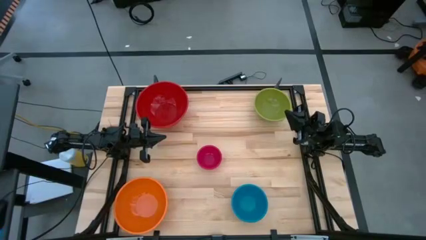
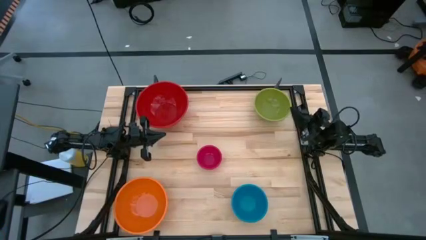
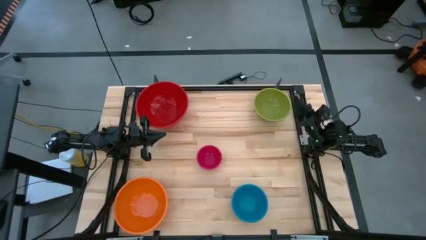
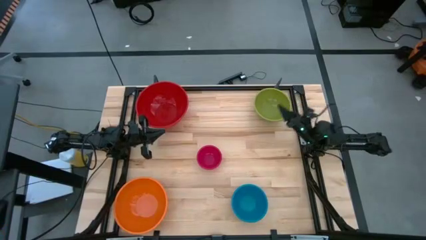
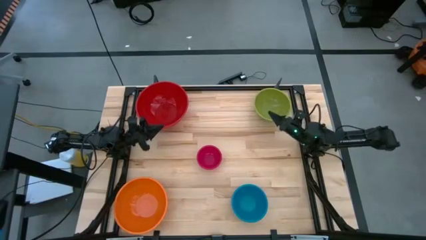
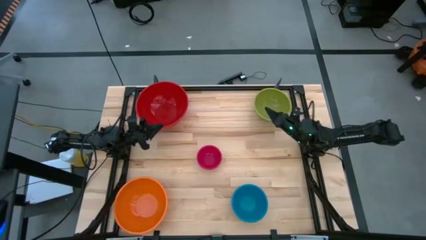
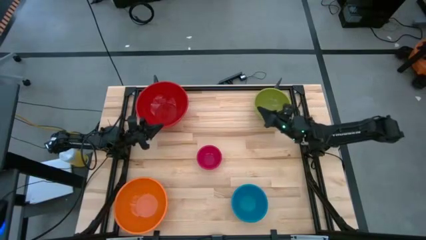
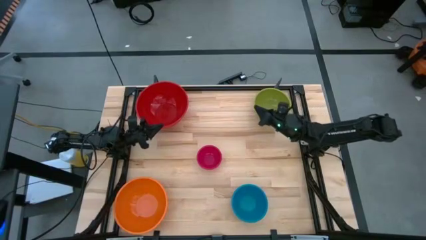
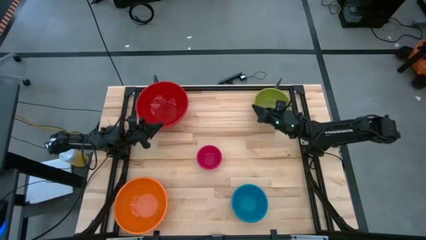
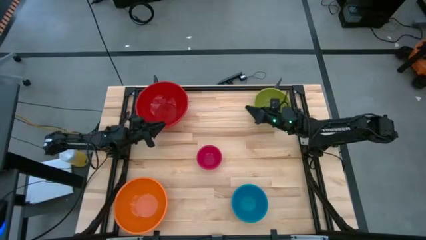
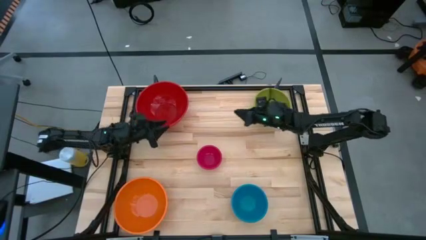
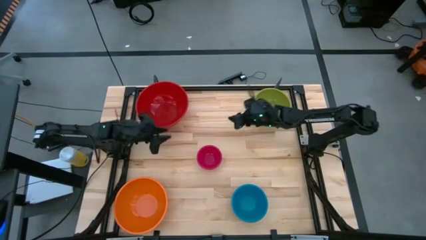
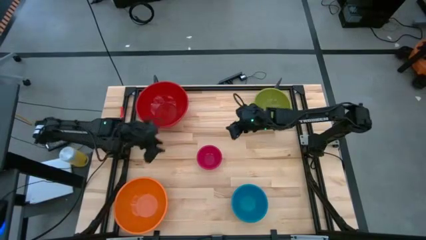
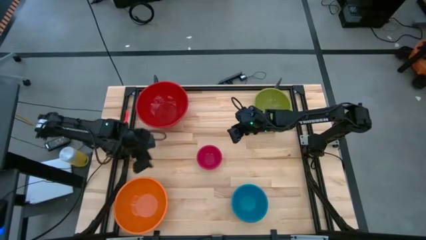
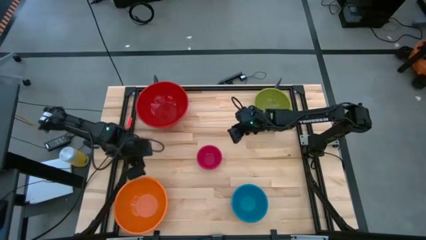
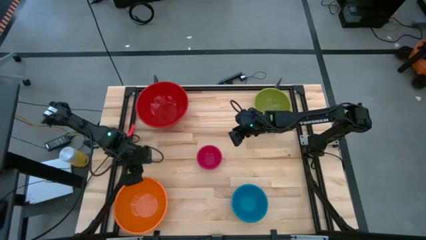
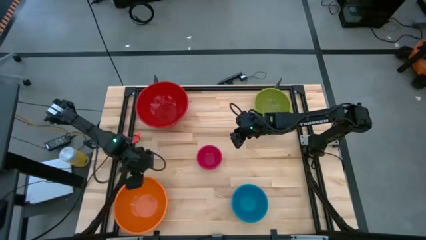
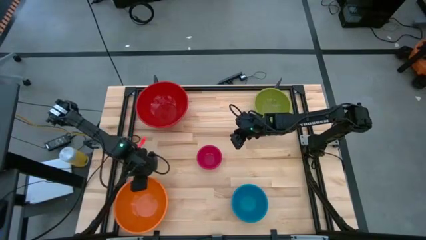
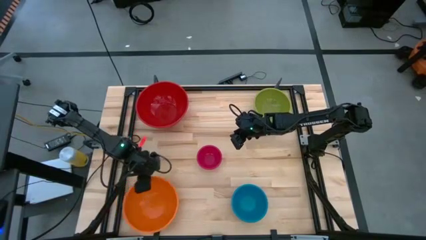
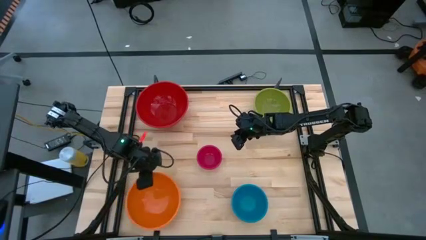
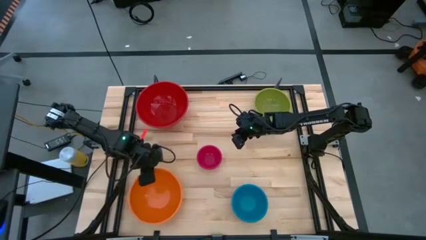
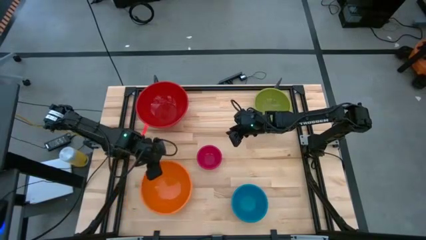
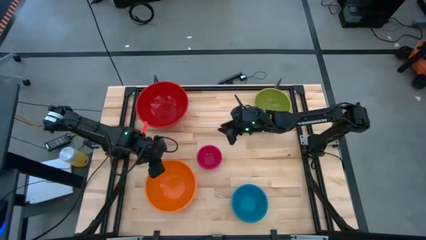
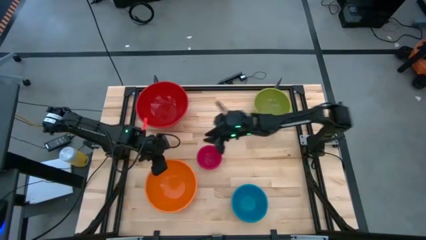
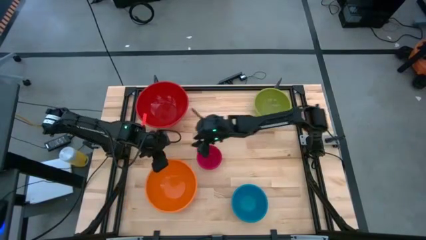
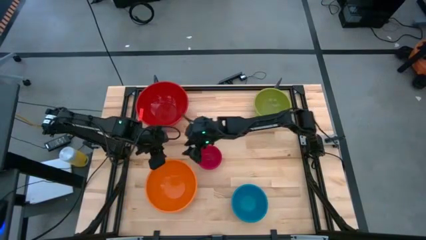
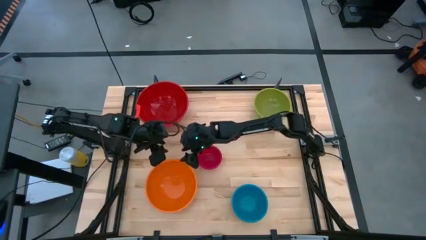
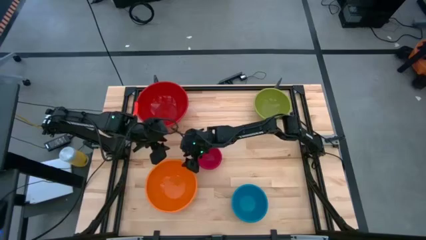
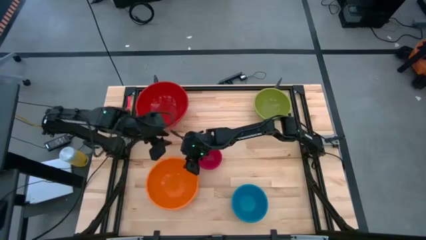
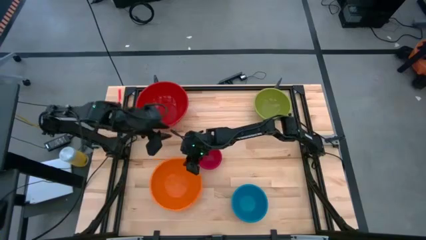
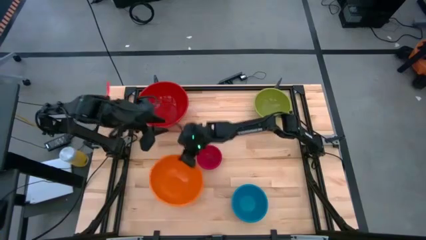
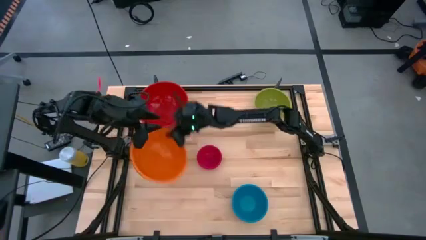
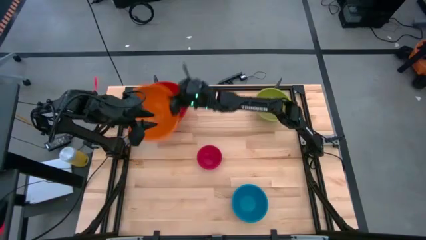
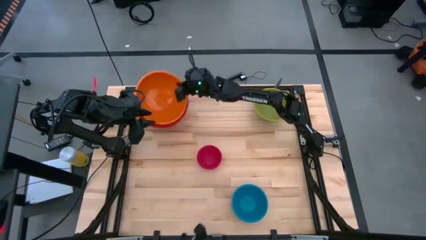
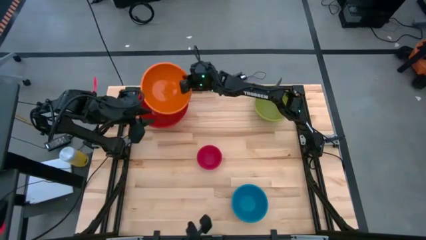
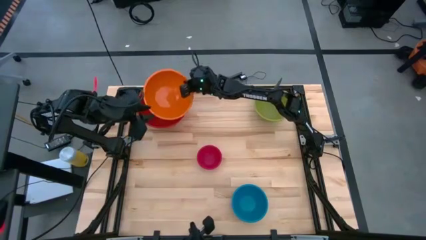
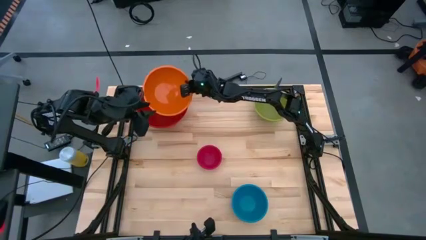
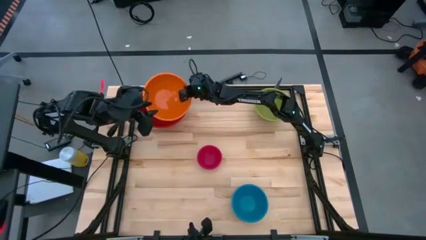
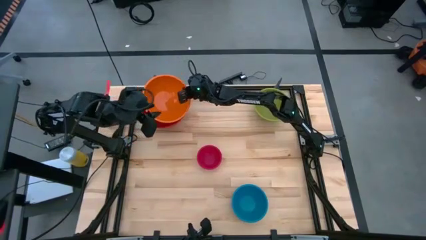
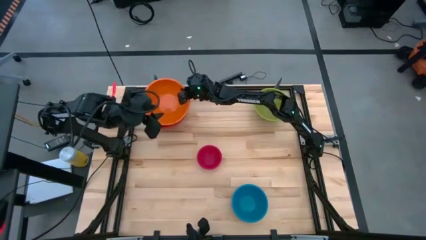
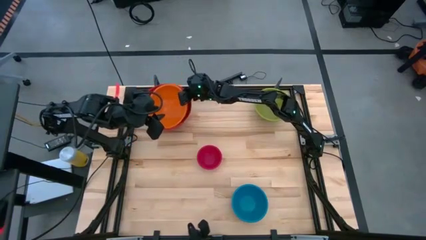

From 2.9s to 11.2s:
Stack orange bowl on top of the red bowl

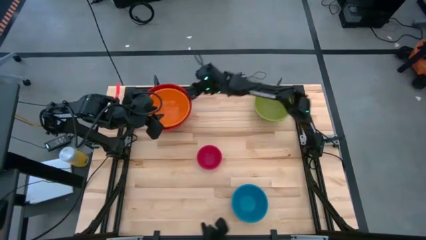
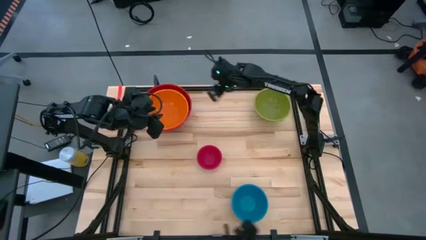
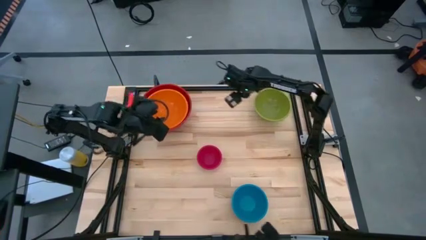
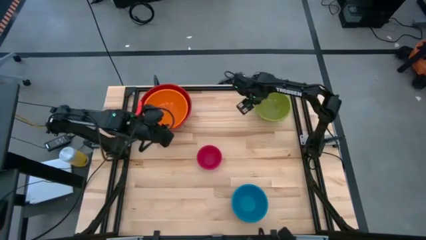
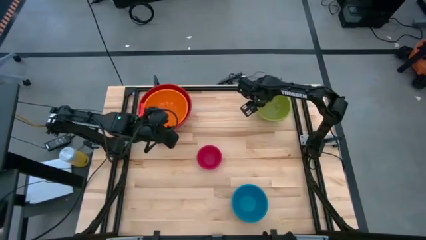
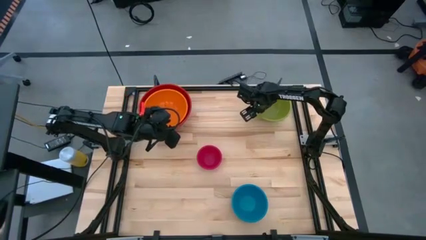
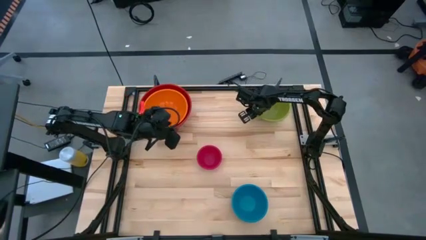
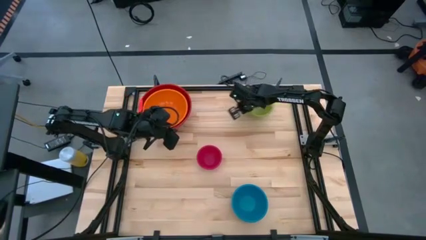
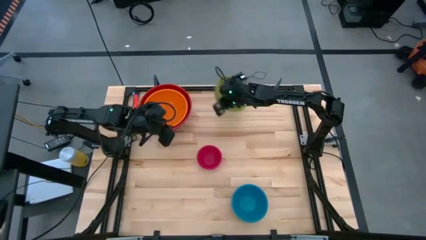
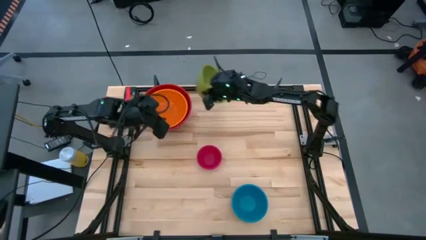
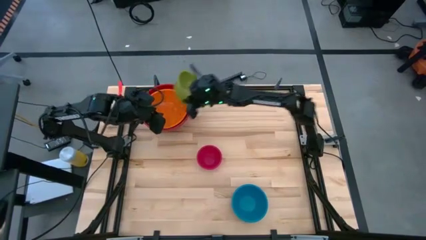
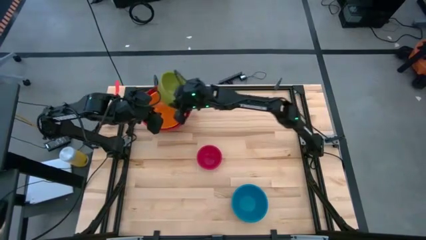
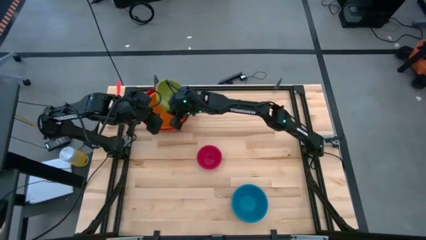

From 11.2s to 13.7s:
Stack green bowl on top of the orange bowl

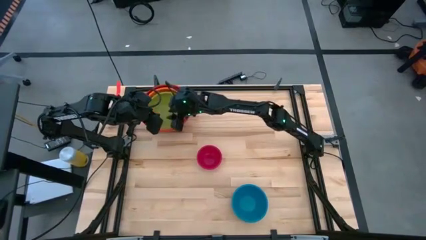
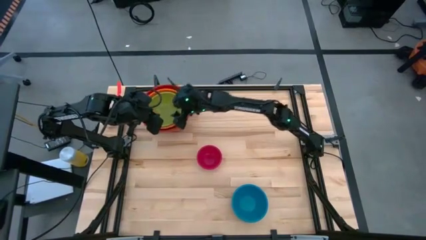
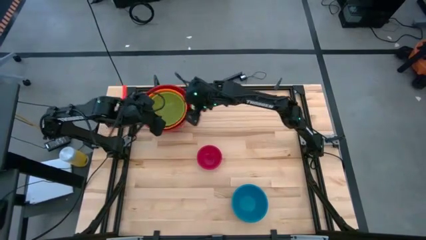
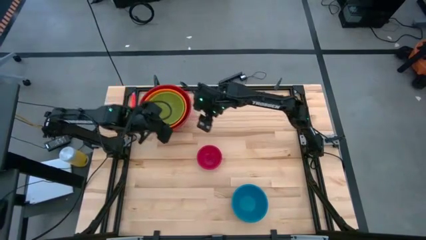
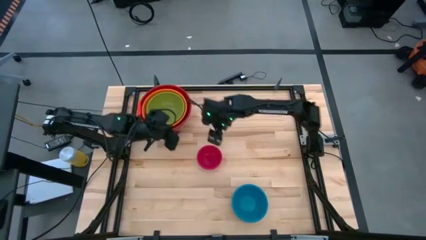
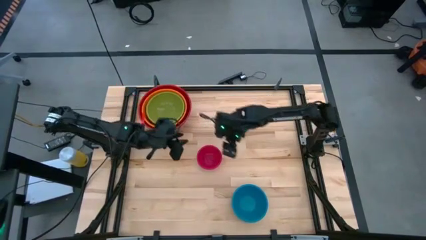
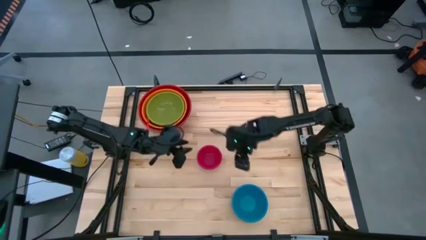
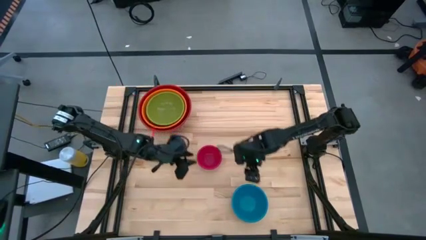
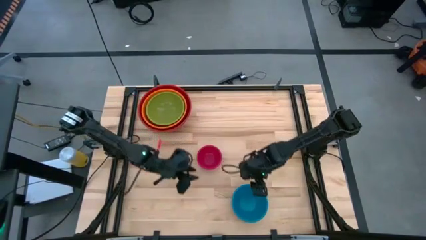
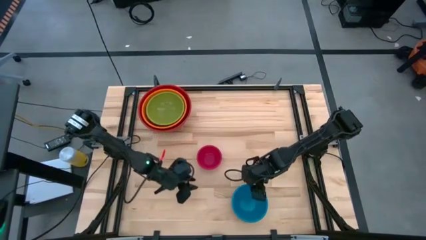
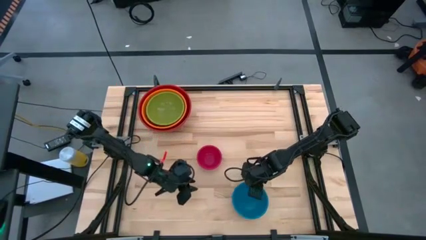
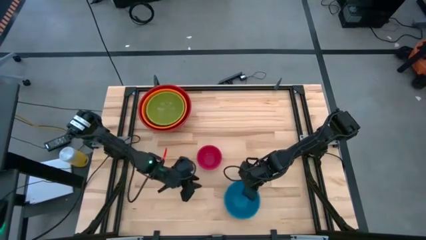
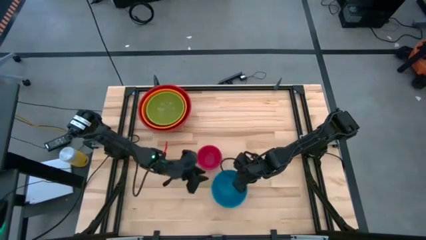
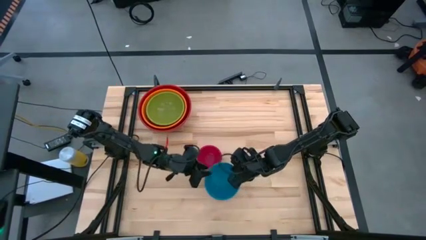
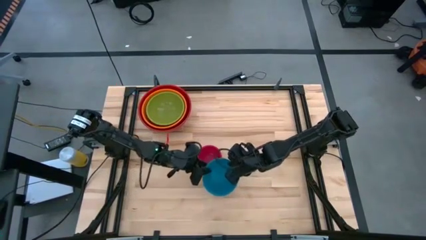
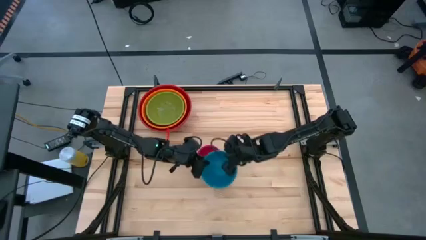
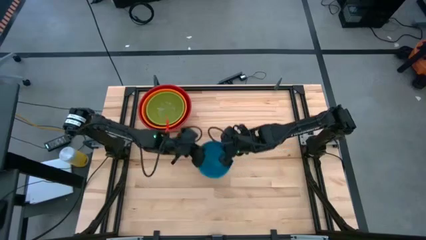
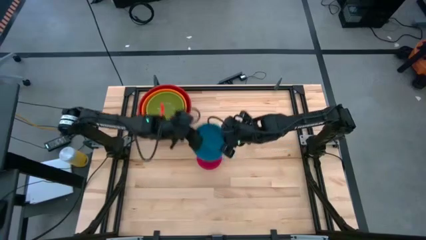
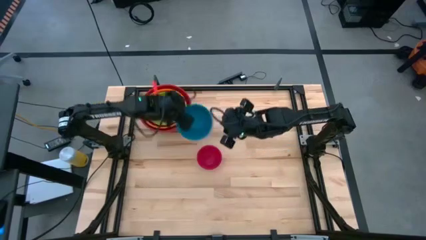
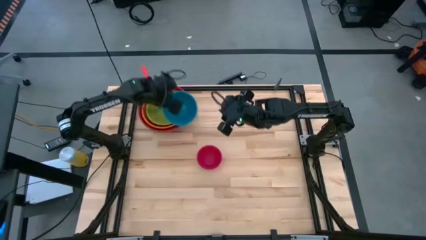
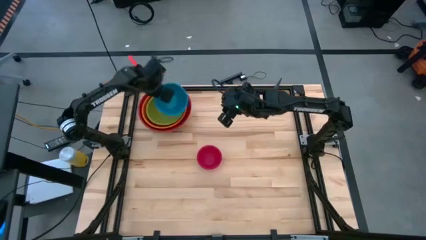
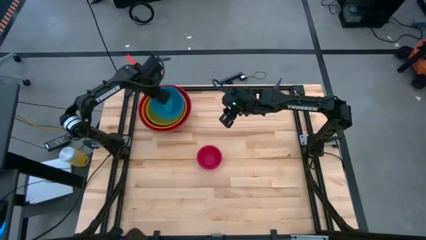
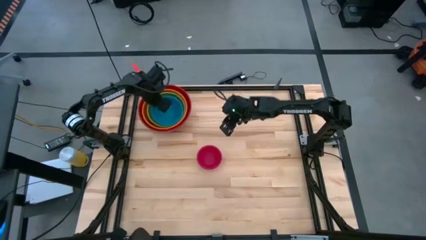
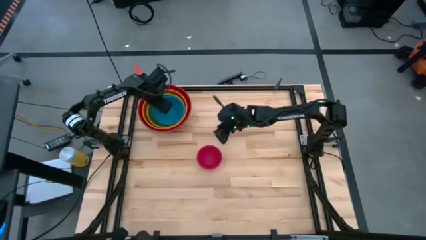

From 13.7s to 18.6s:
Stack blue bowl on top of the green bowl

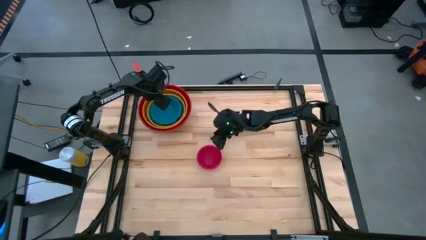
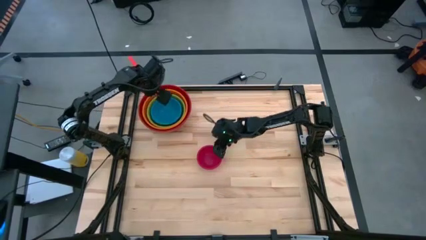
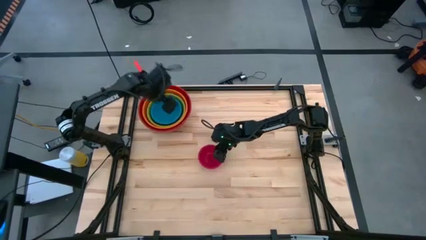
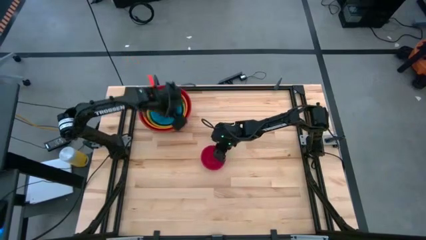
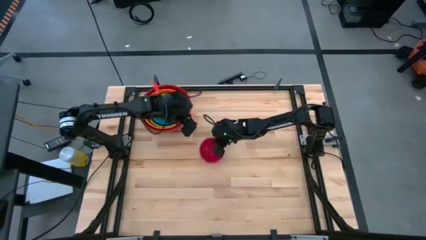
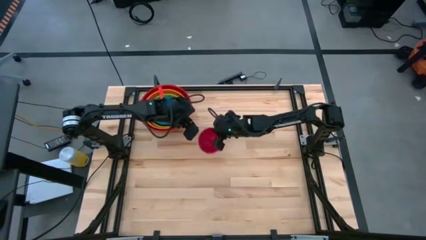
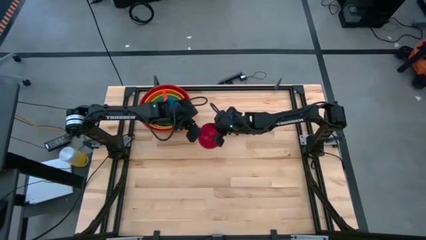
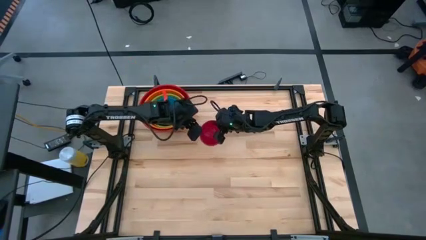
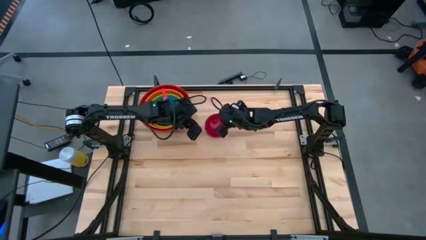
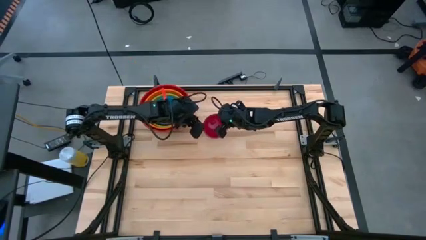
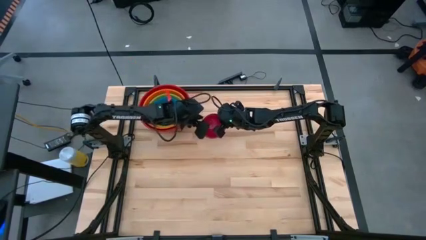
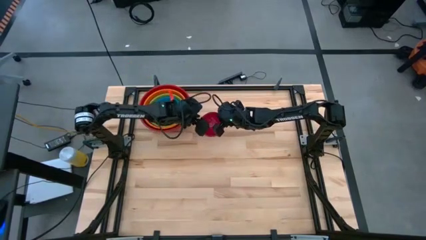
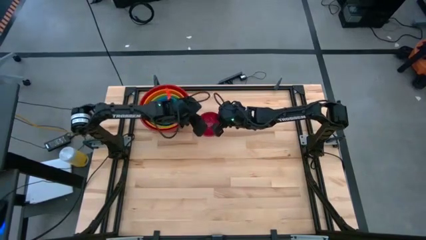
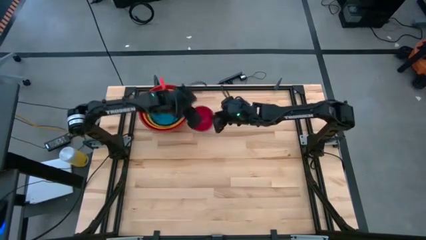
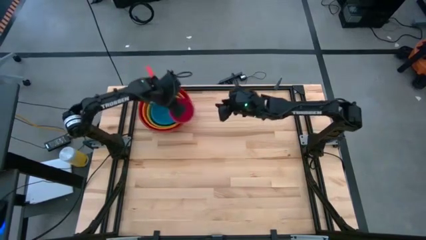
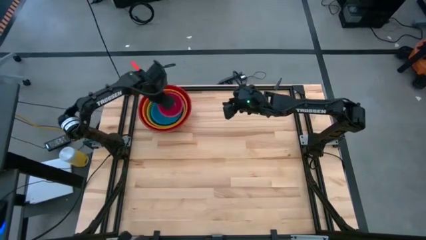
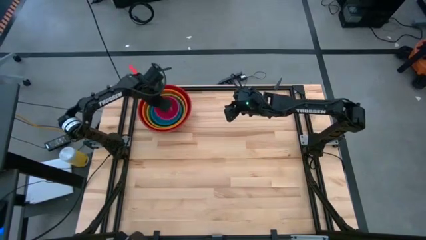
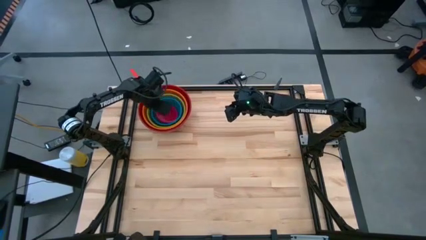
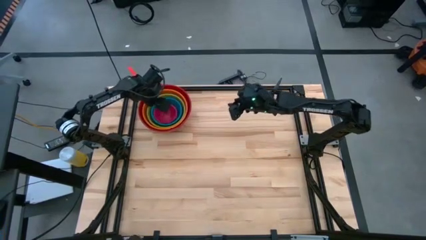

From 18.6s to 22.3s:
Stack the pink bowl on top of the blue bowl
